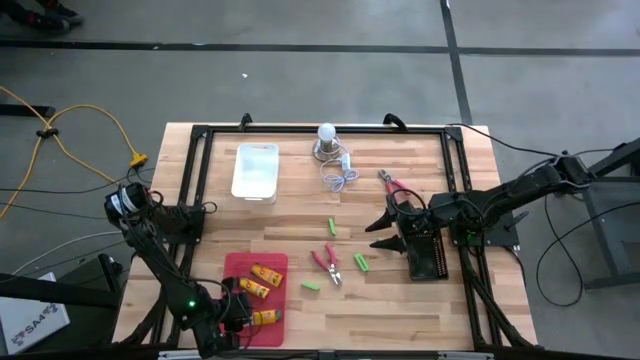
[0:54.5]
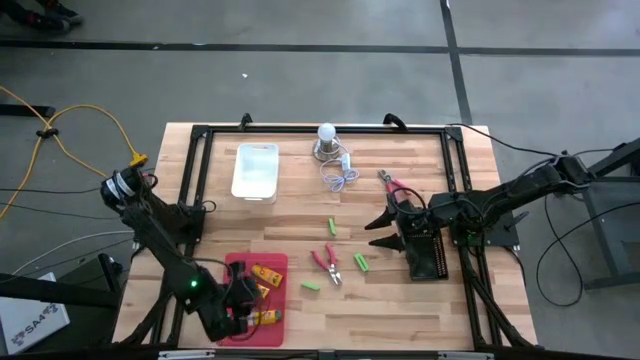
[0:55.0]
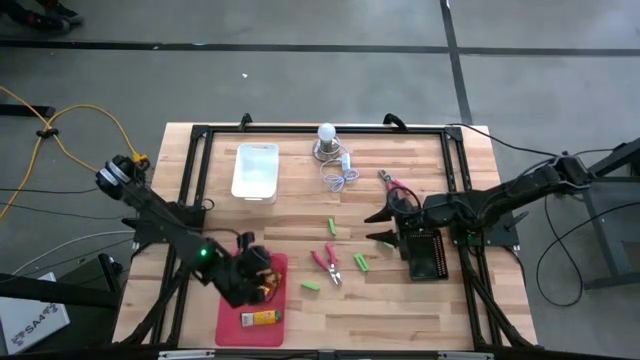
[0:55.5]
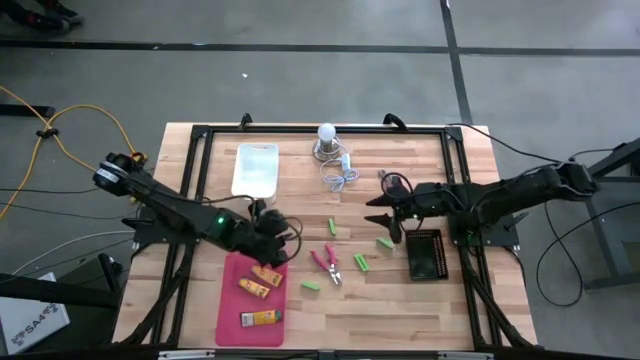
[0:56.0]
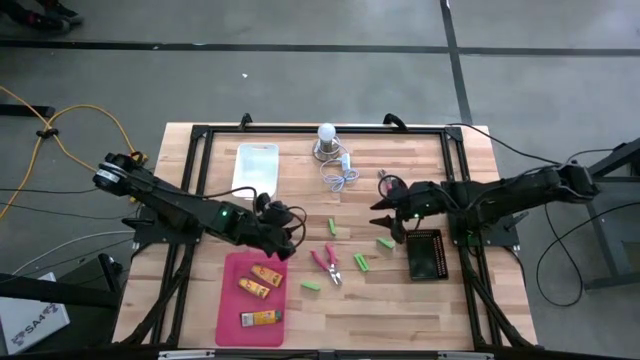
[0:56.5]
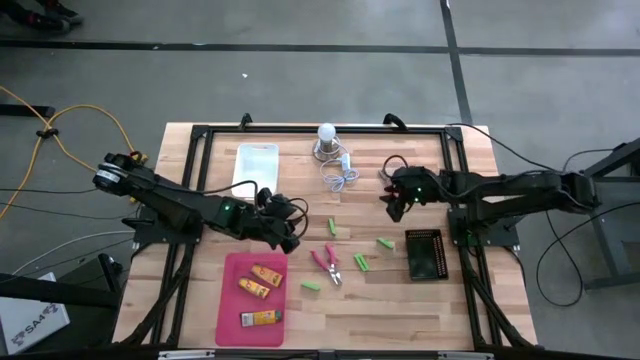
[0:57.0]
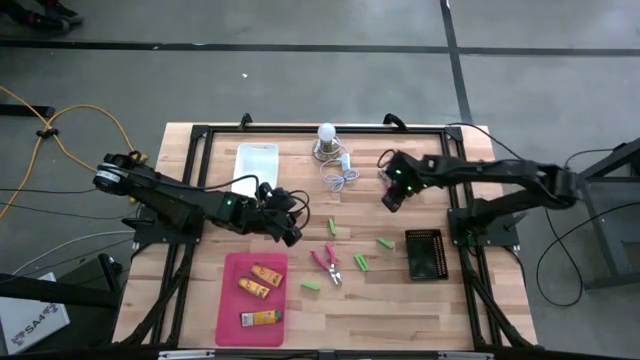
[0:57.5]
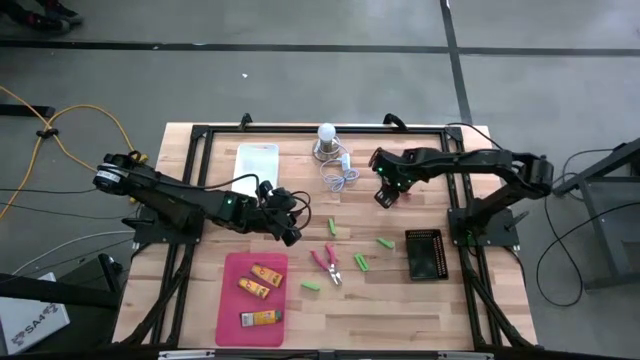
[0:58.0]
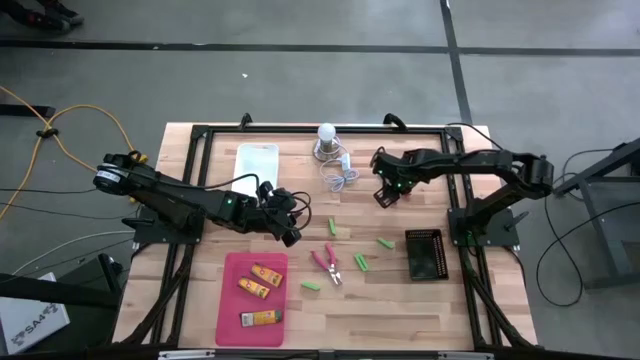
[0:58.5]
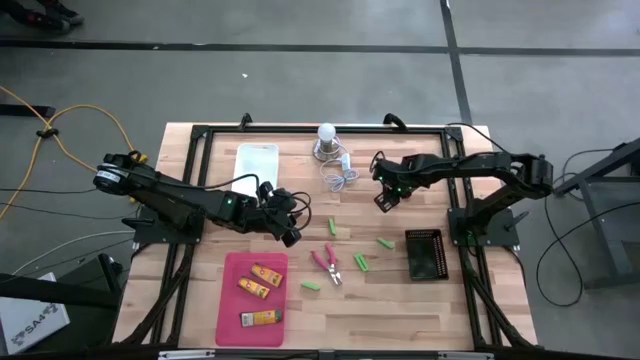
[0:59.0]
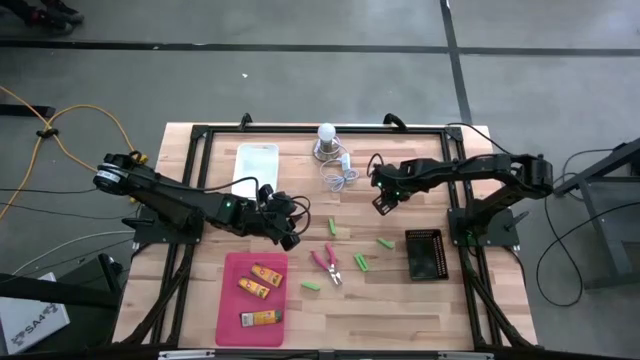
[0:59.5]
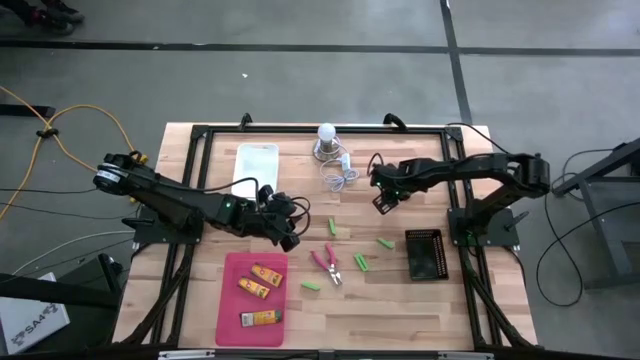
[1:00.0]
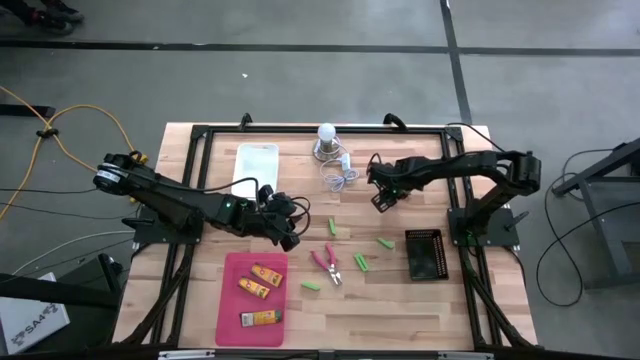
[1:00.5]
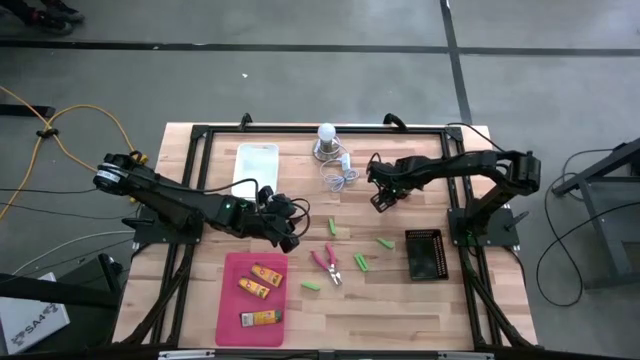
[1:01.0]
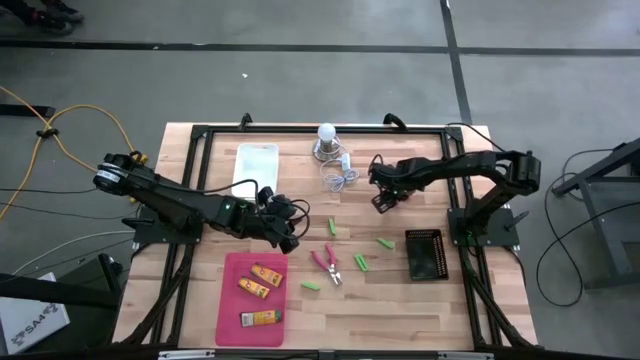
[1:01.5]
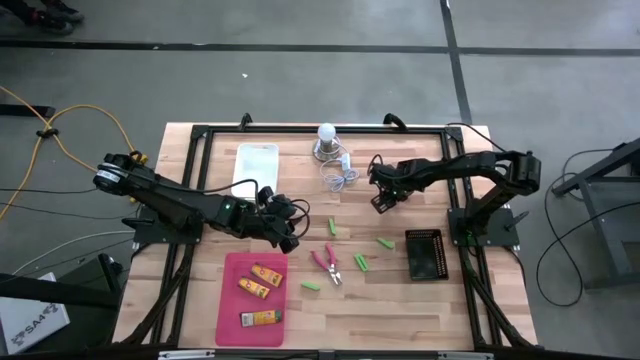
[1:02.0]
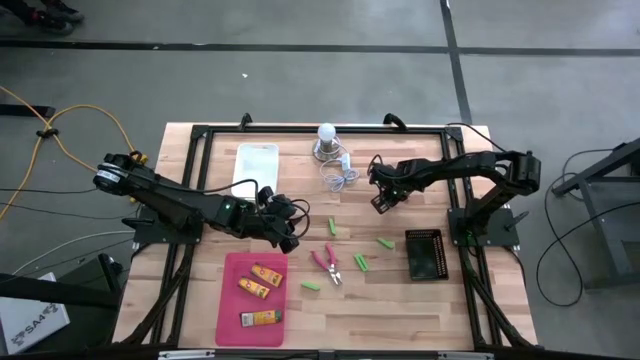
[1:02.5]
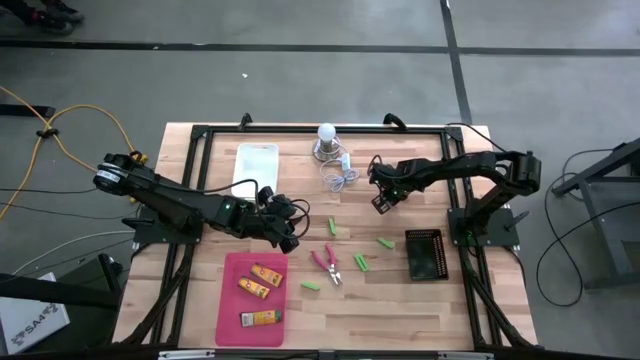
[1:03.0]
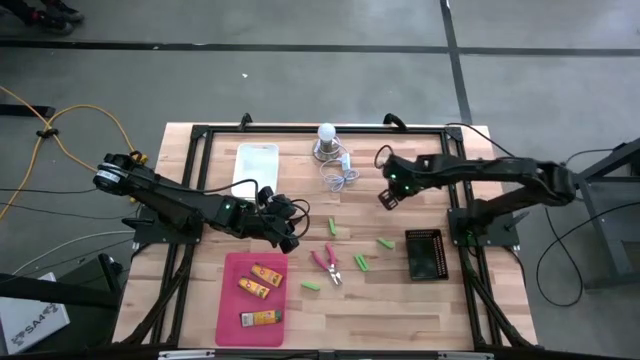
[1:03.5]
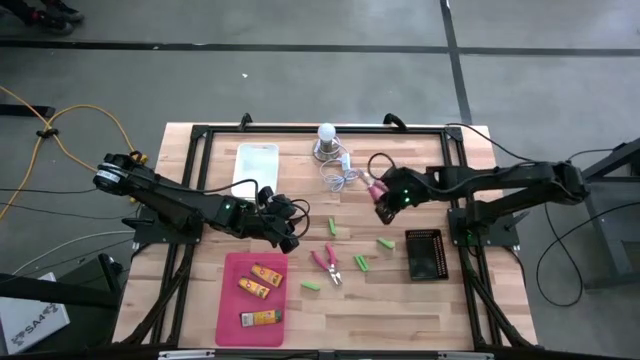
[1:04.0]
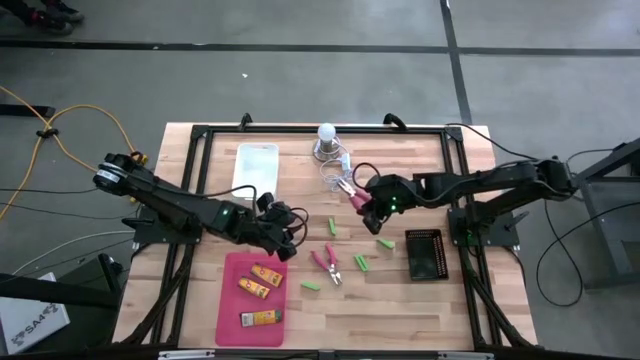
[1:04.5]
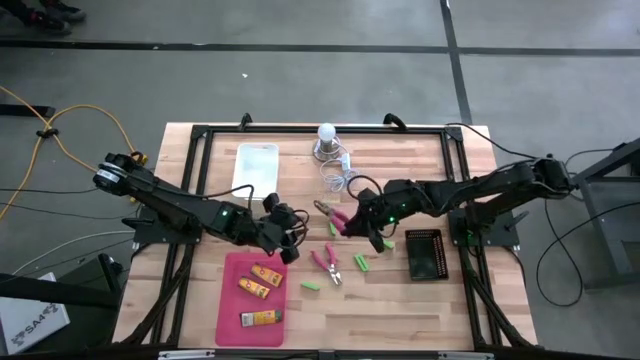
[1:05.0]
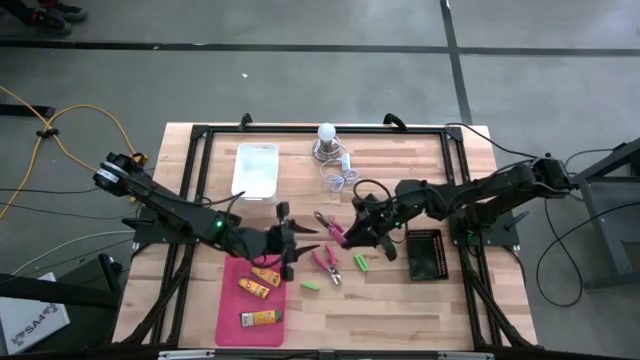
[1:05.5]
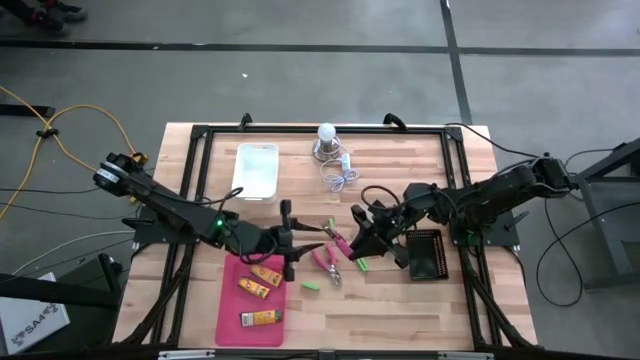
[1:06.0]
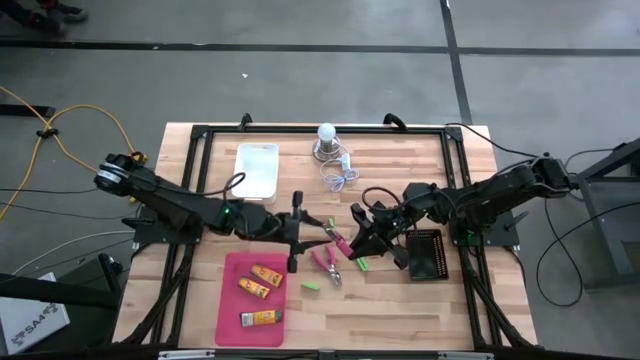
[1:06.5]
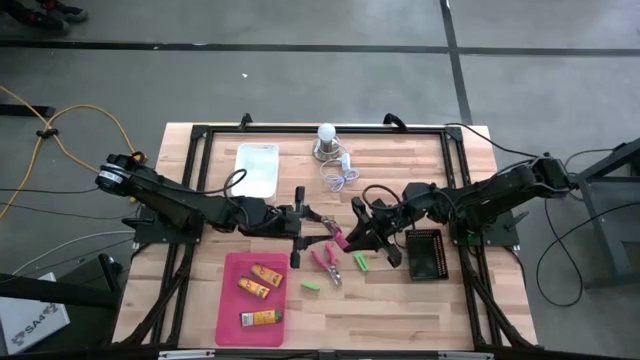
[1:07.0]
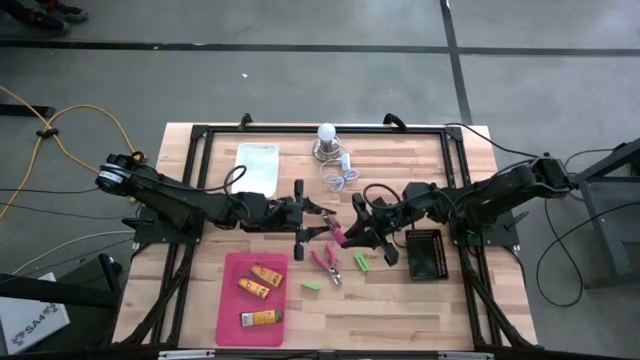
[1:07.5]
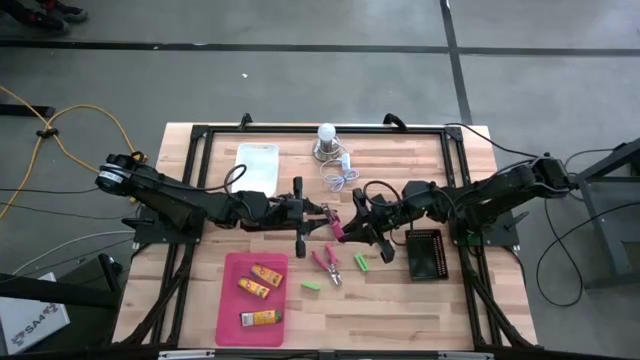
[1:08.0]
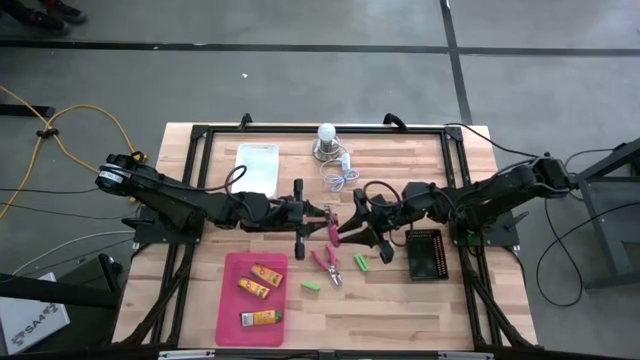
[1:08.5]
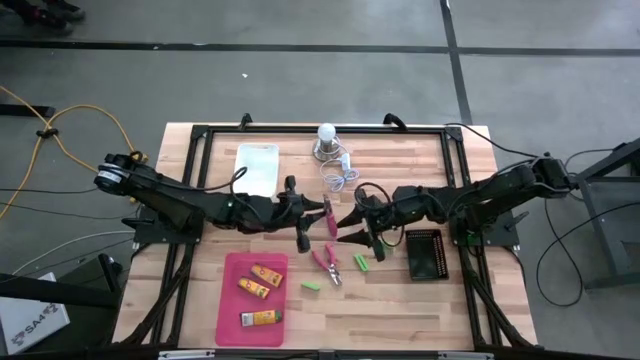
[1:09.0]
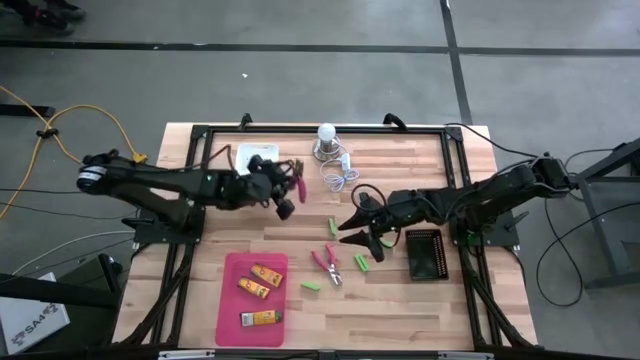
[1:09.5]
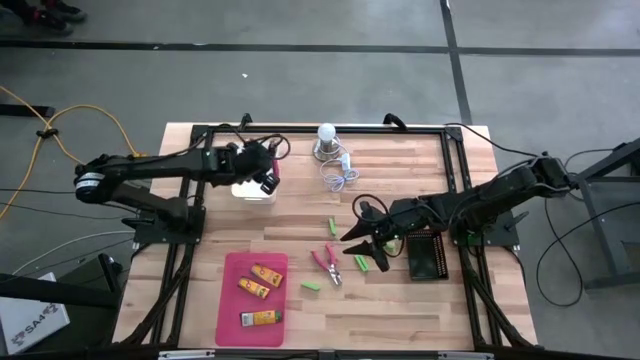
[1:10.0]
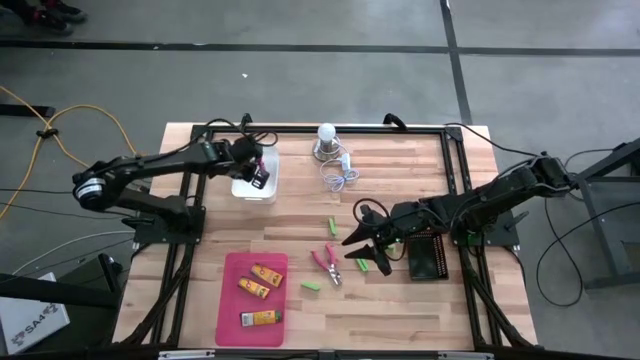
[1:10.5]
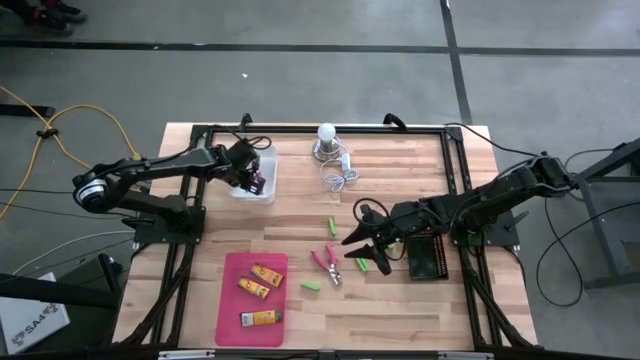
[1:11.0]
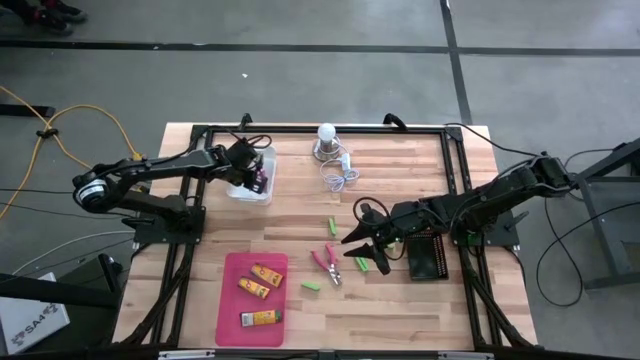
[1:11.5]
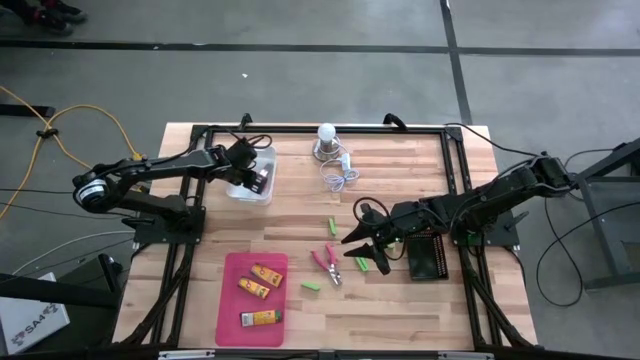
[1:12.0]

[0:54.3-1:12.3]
Task: Pick & Place School Supplies
Put the top pliers into the white bin

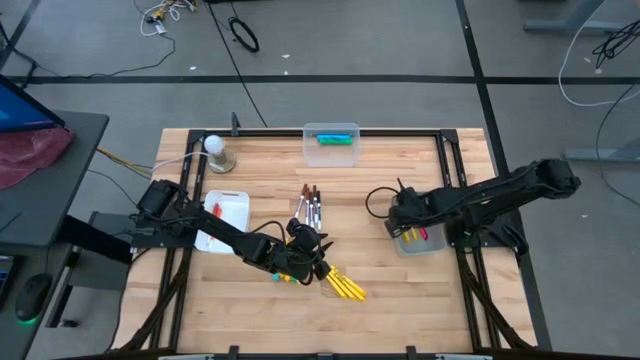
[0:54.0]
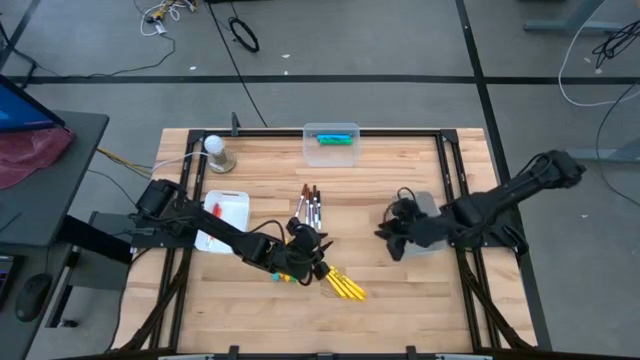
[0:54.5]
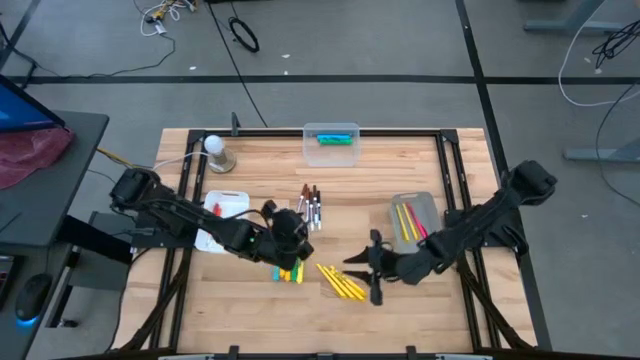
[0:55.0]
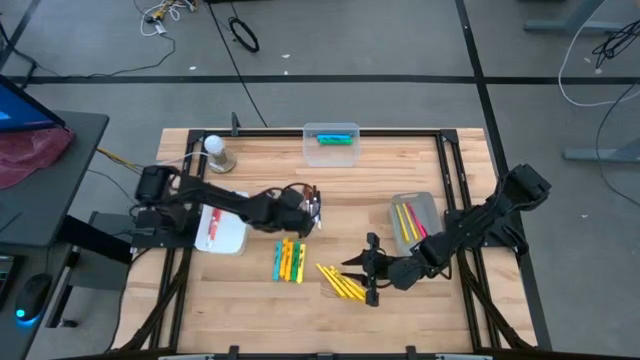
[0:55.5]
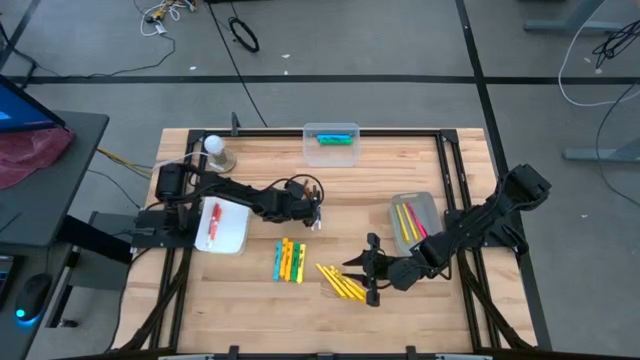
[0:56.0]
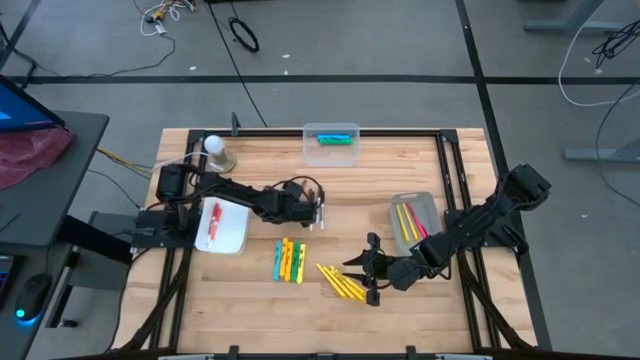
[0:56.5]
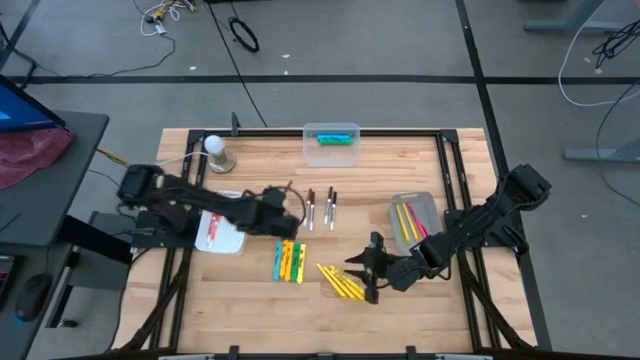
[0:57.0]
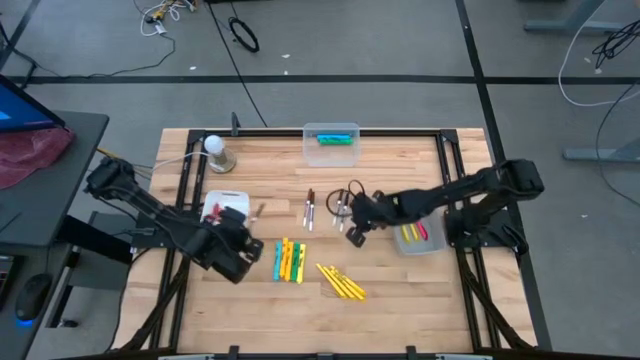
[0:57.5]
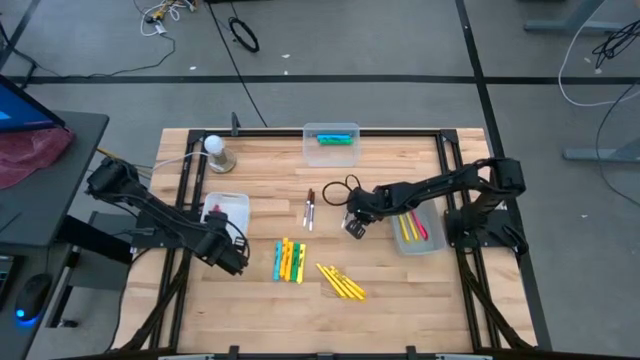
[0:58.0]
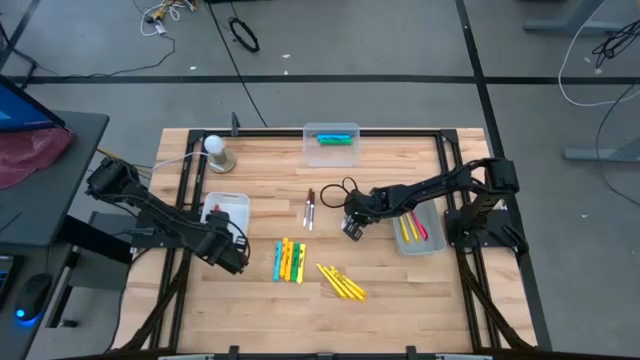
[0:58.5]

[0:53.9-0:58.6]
Task: Pick & Place Markers
Put the light brown marker pen into the white bin

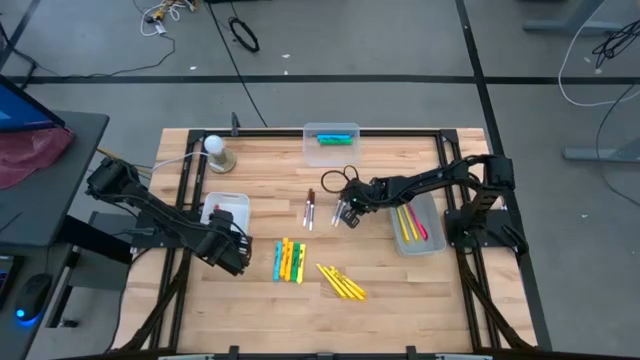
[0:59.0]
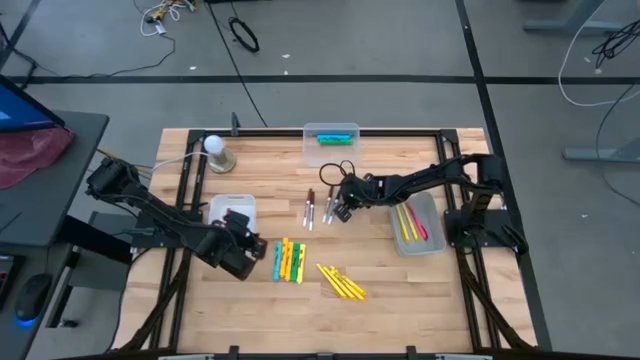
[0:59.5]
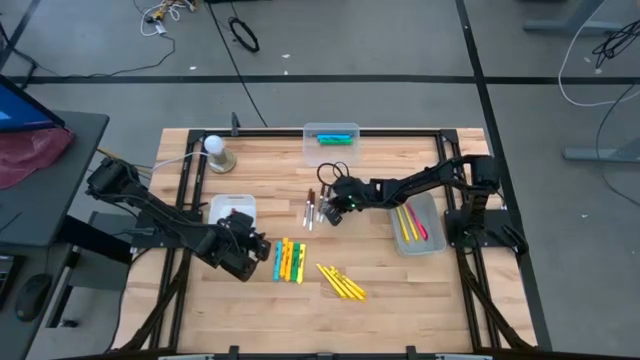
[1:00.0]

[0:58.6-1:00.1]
Adjust the marker pens on the table
